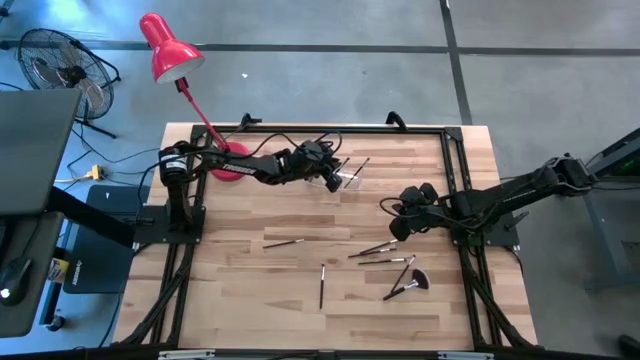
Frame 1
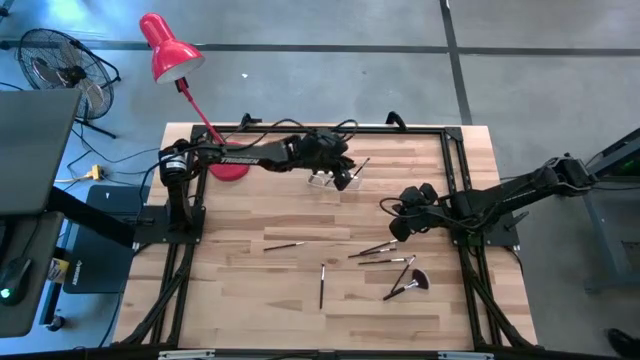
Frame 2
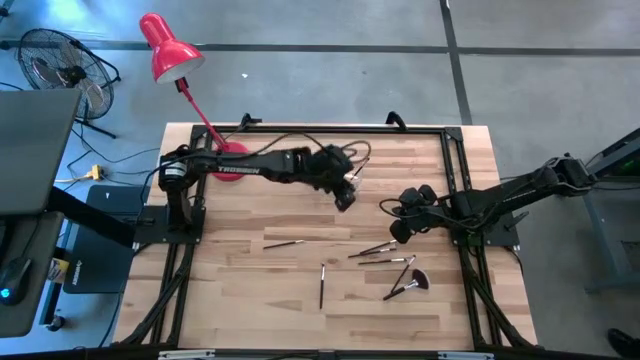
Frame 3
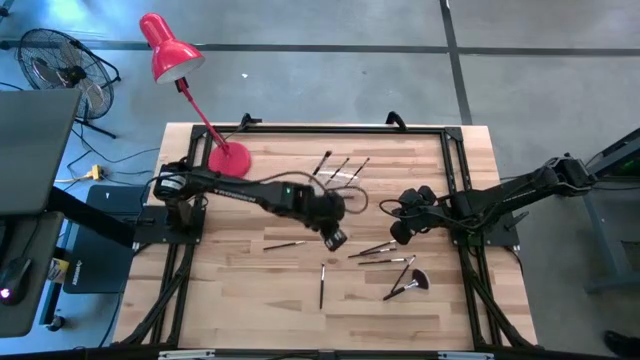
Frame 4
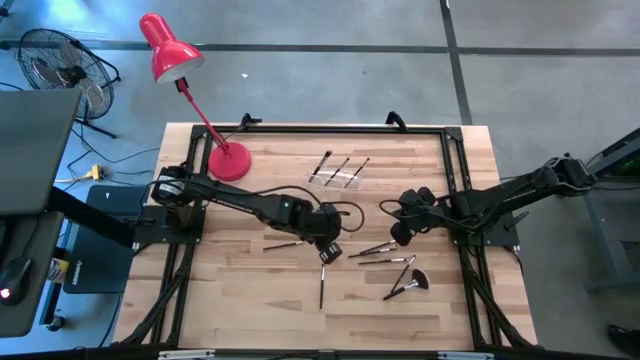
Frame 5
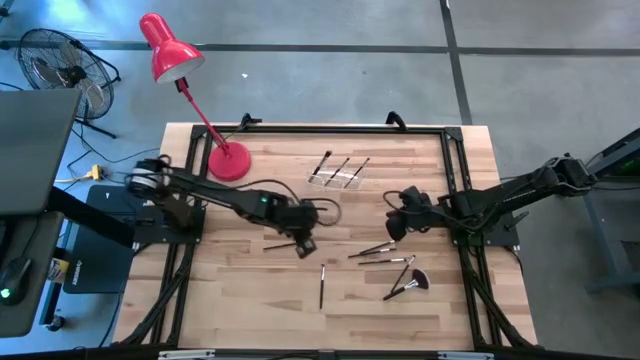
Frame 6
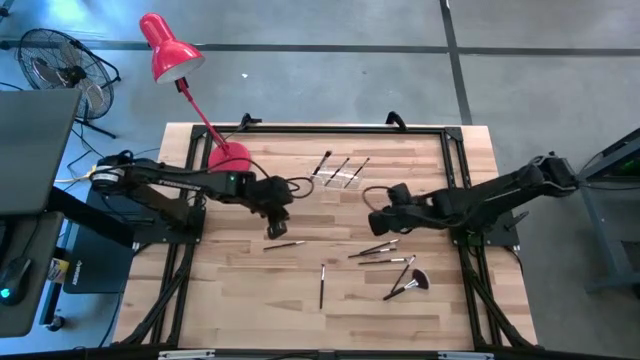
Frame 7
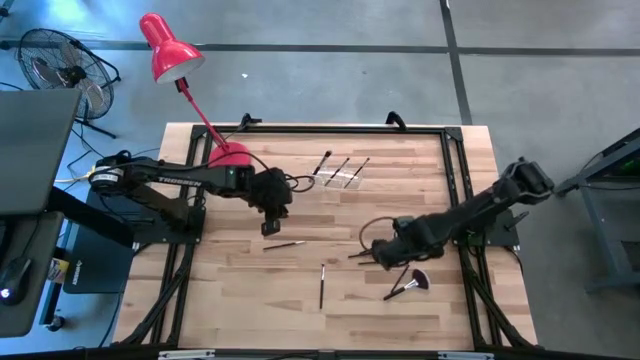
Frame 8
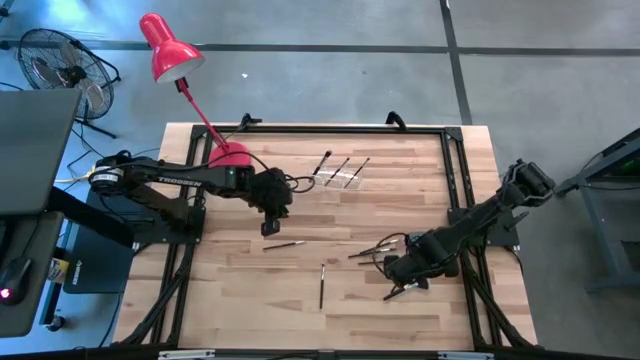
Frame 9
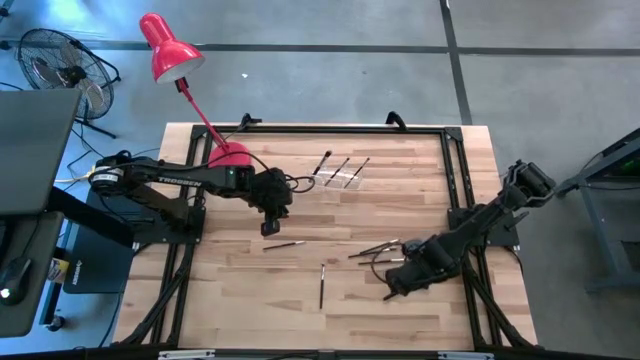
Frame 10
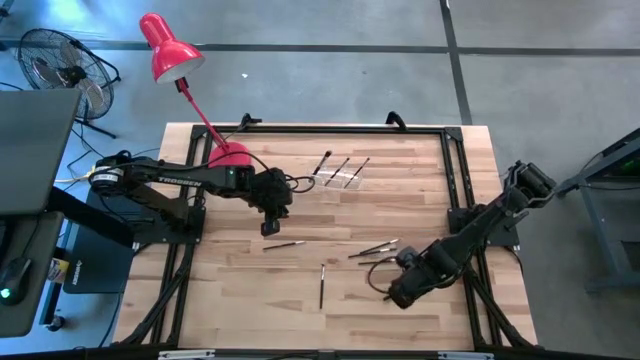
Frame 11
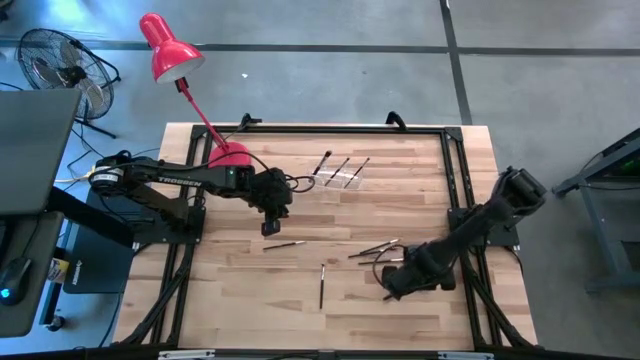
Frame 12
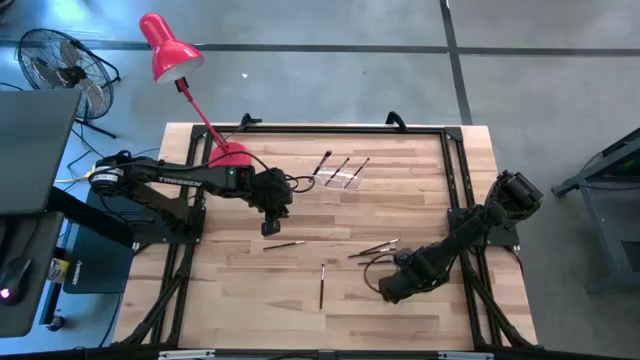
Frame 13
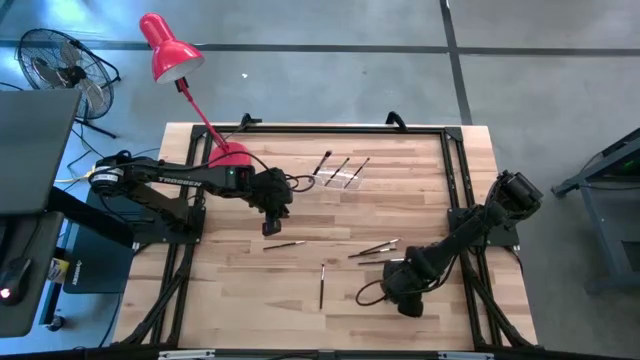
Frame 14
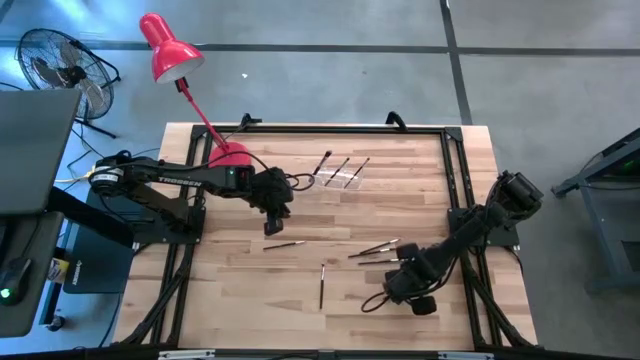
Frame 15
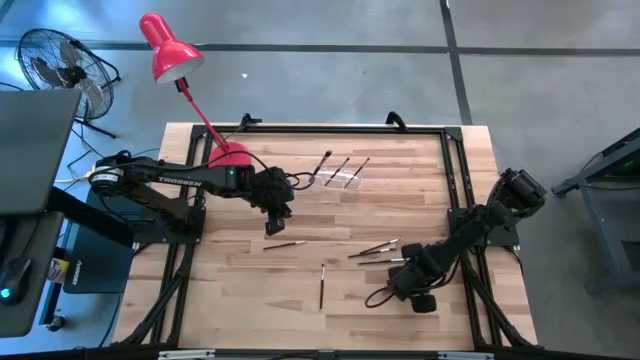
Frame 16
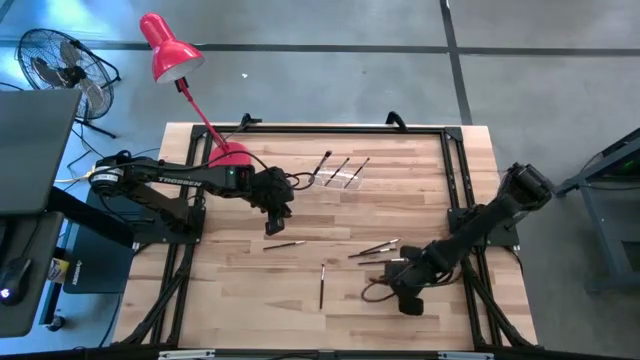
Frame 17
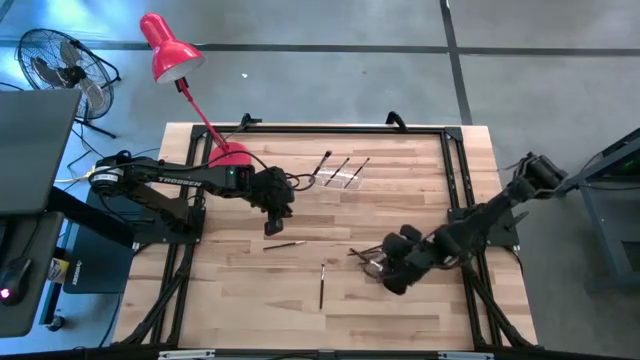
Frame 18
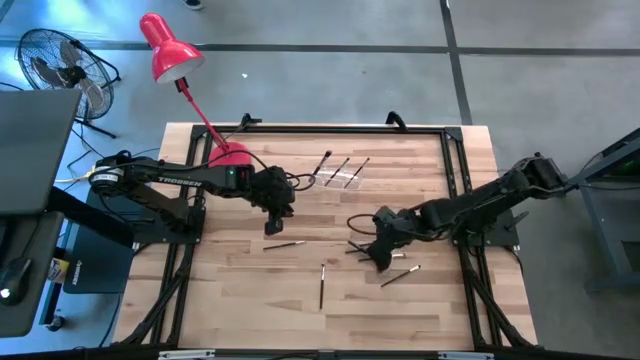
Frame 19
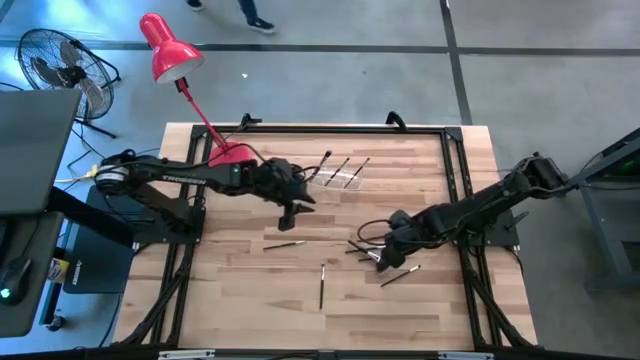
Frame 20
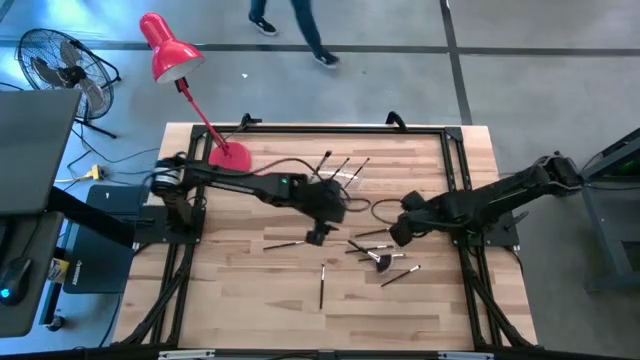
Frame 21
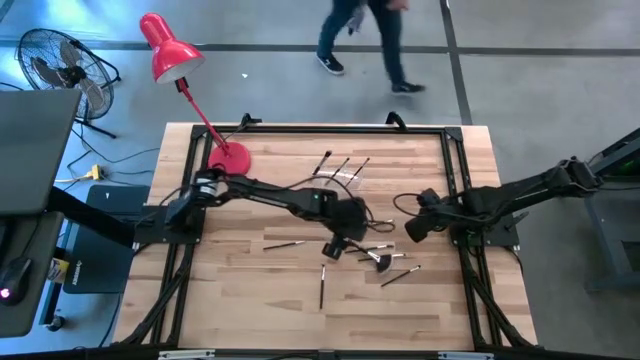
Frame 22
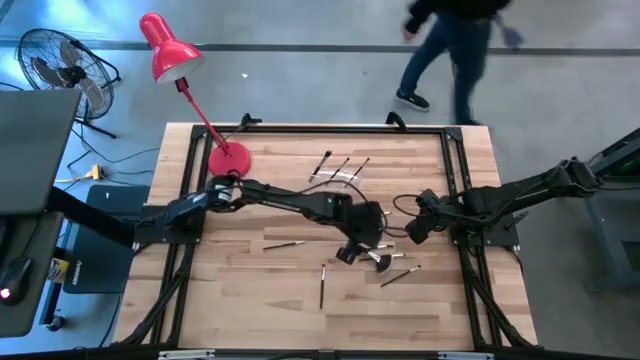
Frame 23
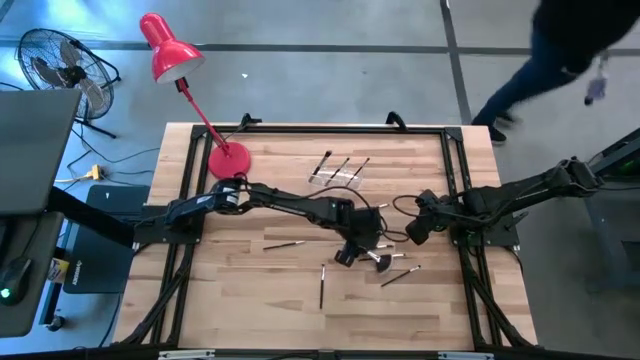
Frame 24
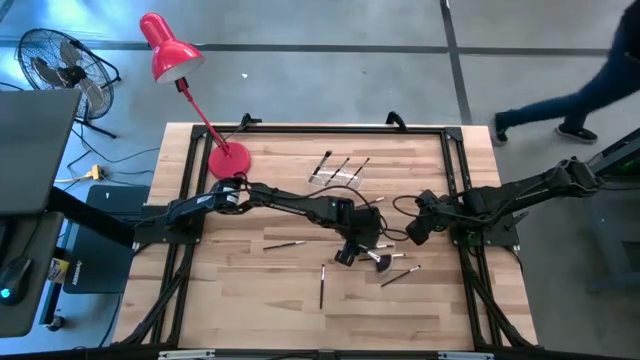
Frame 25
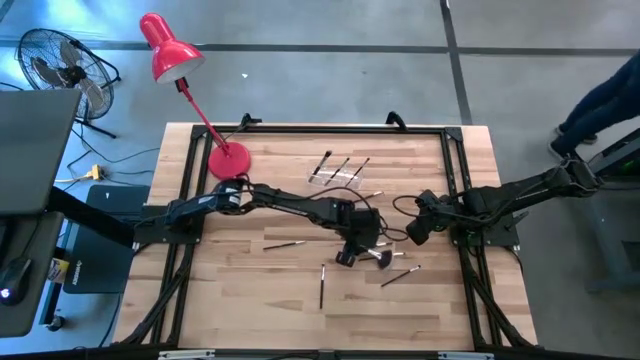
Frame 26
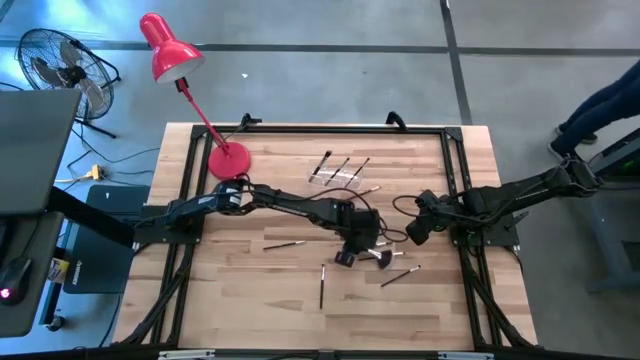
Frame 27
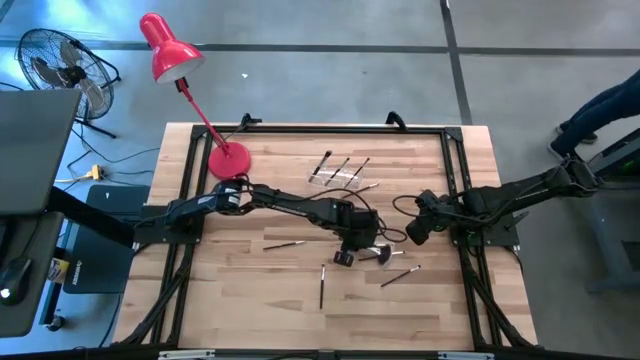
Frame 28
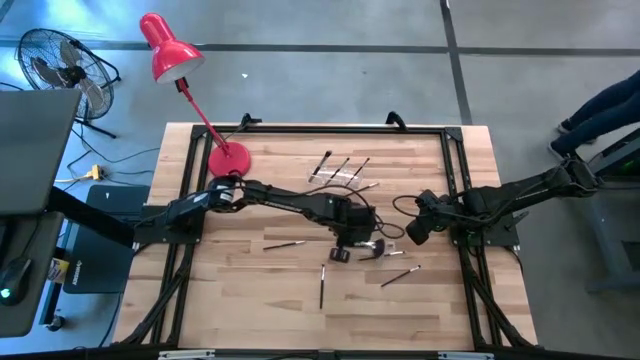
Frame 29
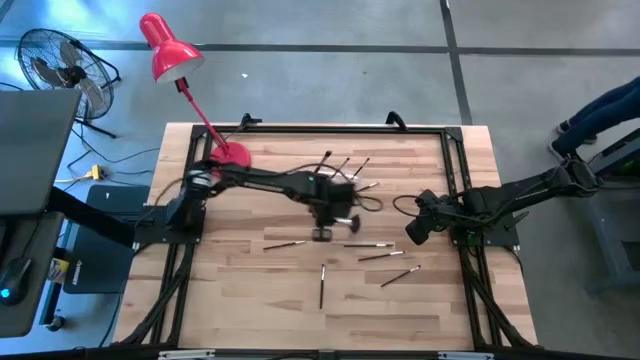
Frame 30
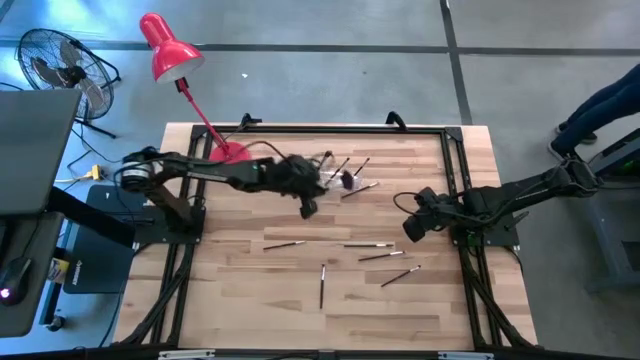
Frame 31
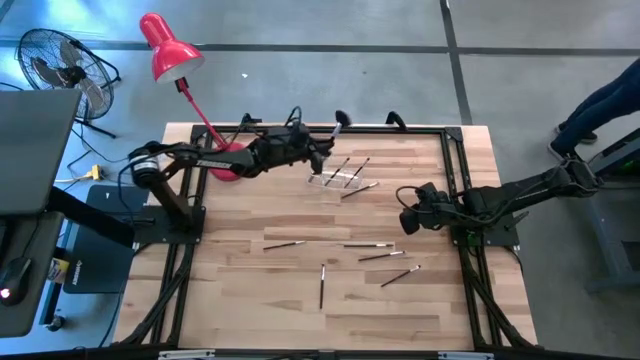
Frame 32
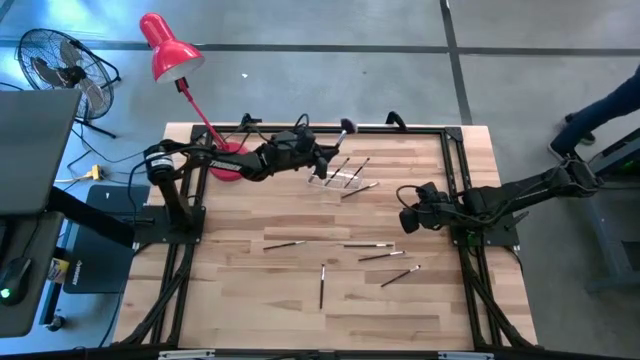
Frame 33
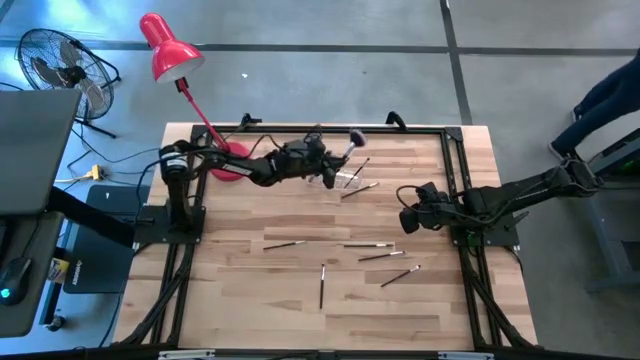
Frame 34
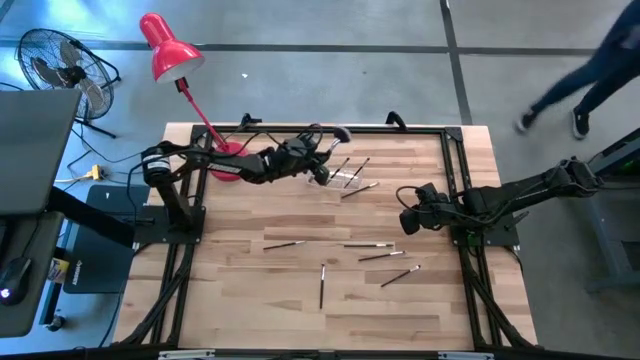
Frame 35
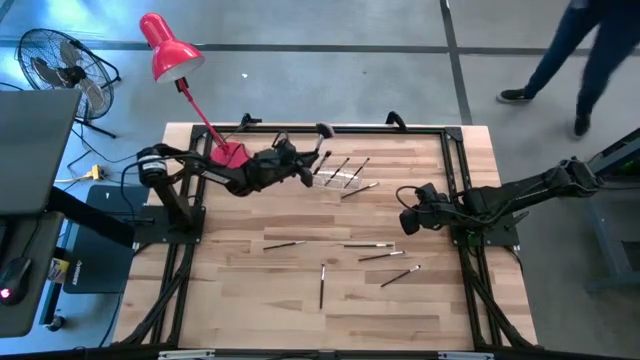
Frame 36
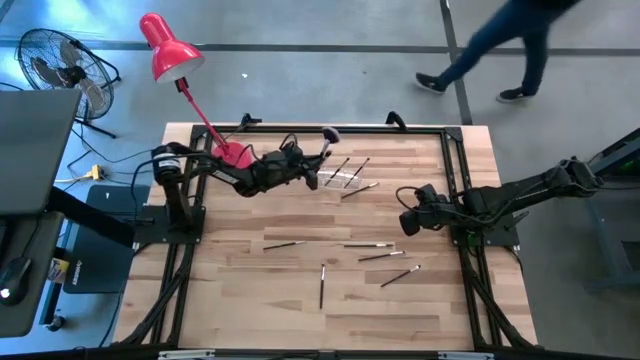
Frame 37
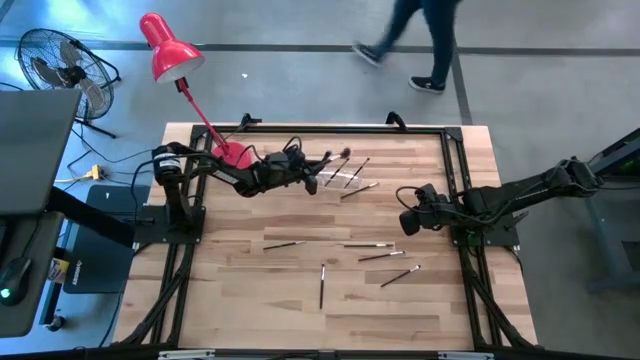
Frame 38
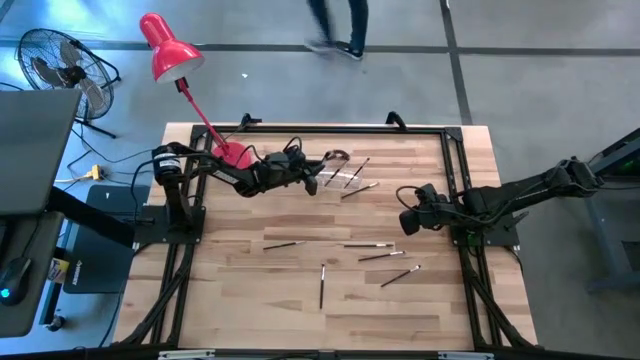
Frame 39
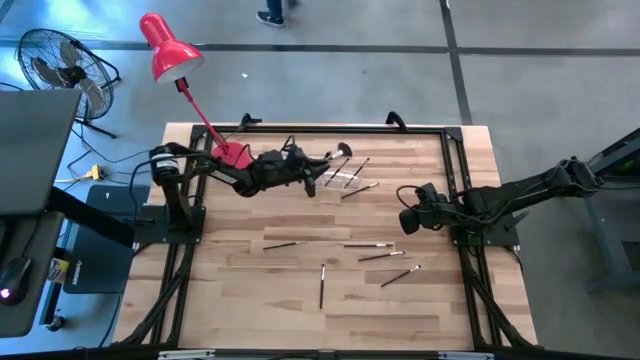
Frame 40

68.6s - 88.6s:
Task: Put items in baskets/containers
Put the highlighter brush into the transparent organizer

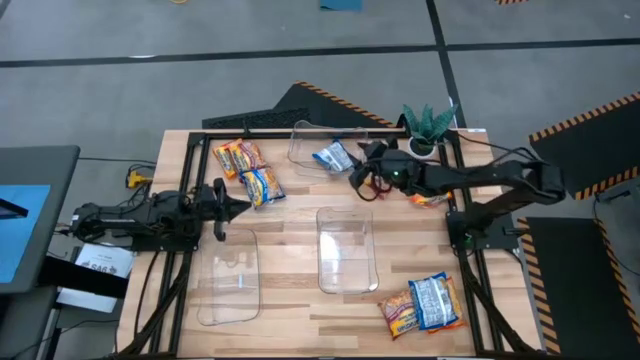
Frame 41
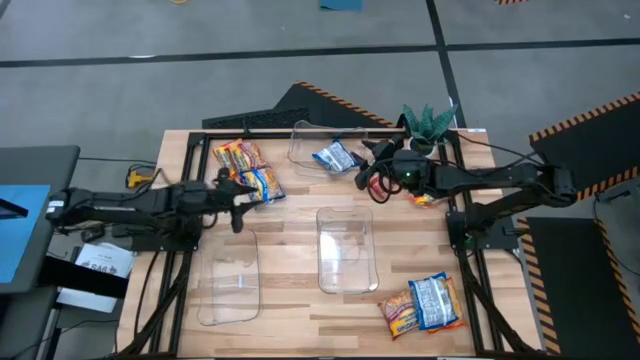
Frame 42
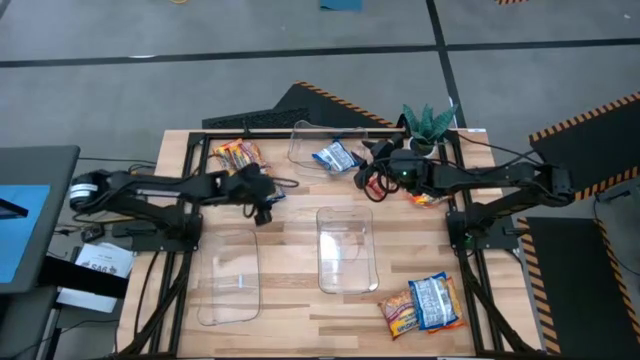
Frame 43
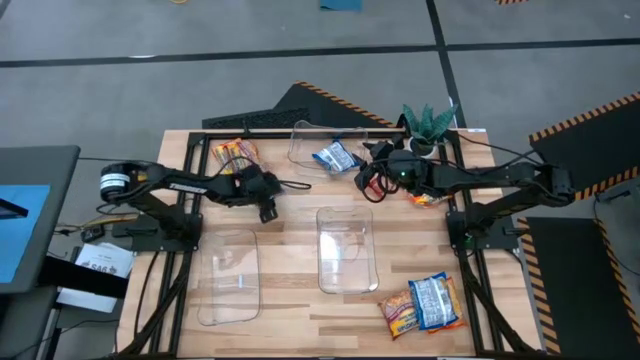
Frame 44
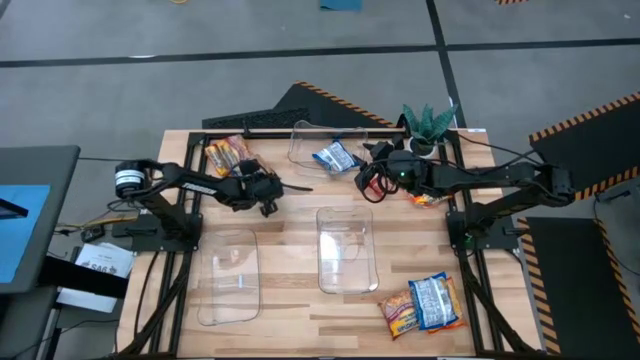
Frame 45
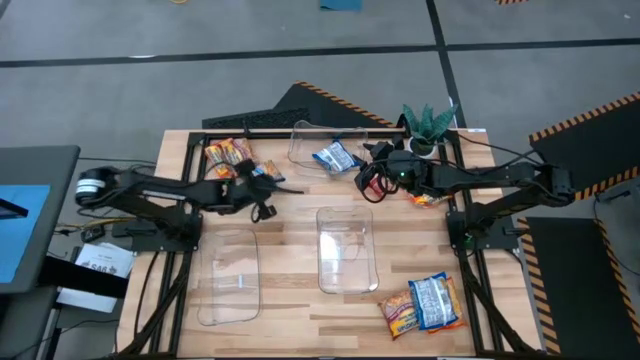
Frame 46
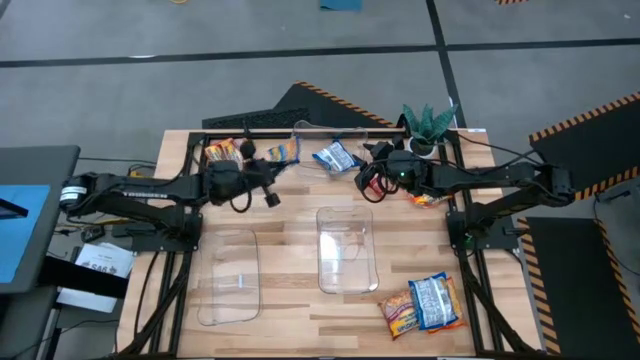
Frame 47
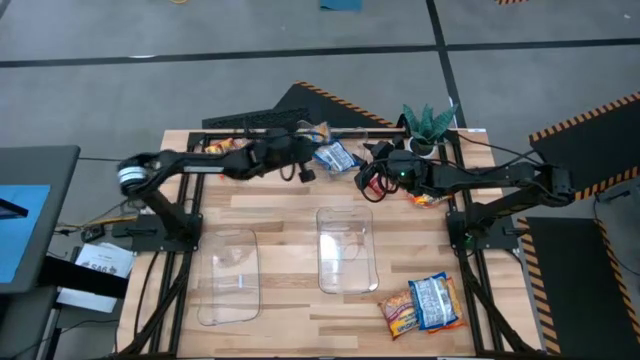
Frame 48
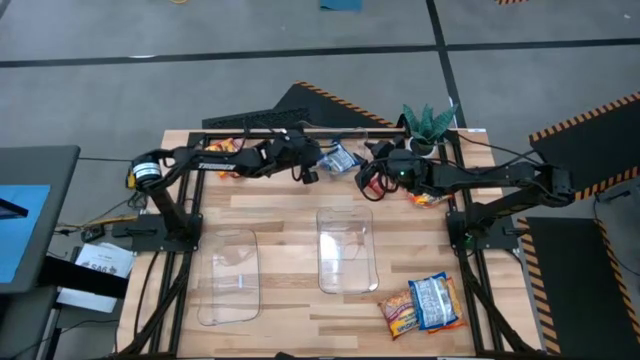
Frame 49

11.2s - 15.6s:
Task: Sort Maruchan noodles
Put the top blue noodle pack into the top transparent bin
